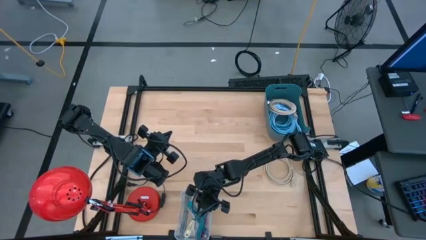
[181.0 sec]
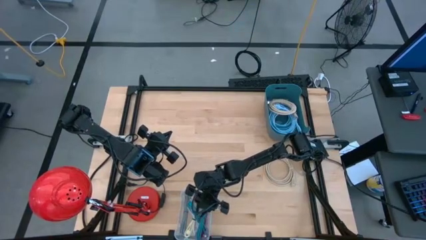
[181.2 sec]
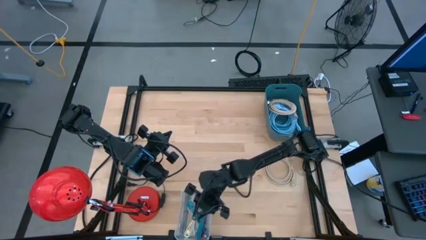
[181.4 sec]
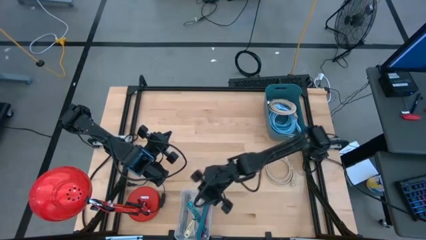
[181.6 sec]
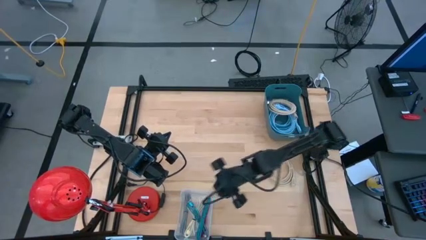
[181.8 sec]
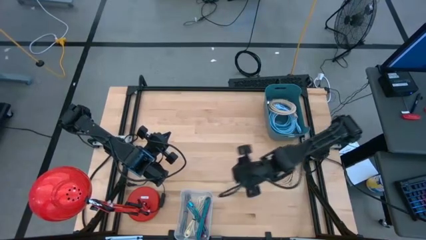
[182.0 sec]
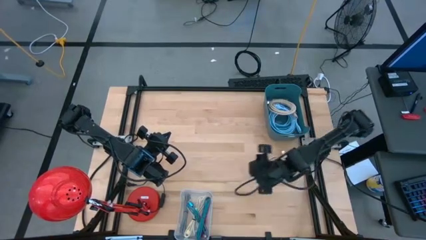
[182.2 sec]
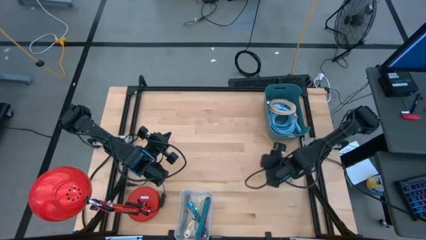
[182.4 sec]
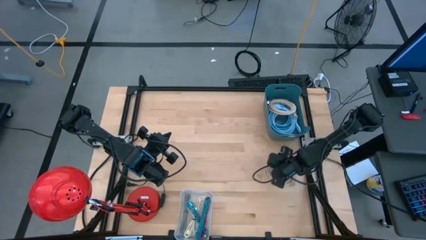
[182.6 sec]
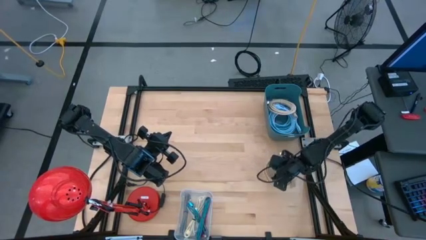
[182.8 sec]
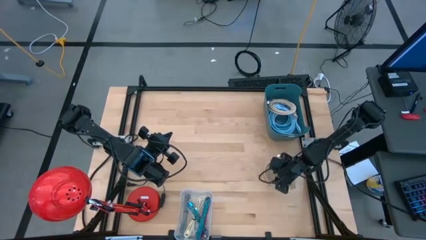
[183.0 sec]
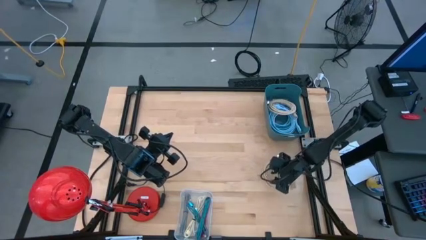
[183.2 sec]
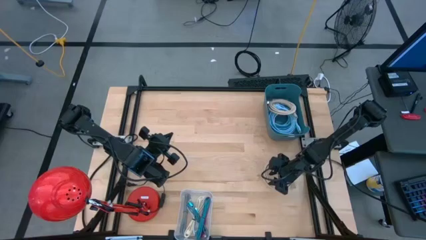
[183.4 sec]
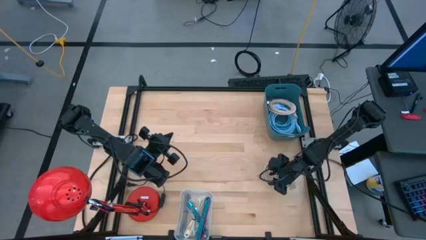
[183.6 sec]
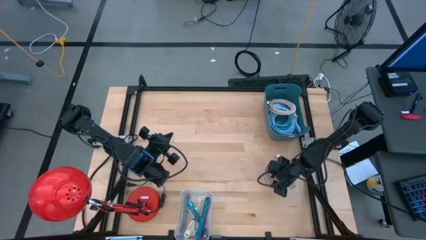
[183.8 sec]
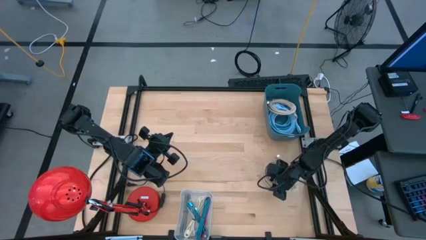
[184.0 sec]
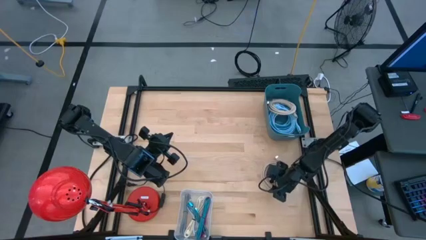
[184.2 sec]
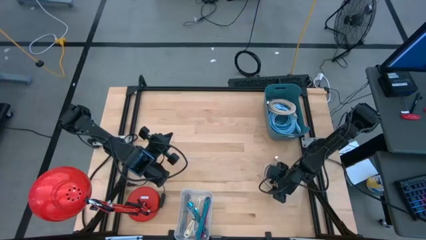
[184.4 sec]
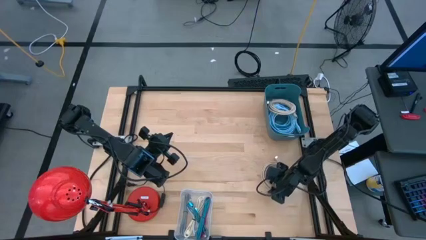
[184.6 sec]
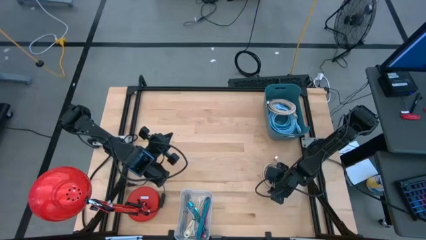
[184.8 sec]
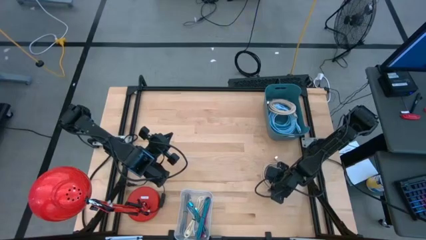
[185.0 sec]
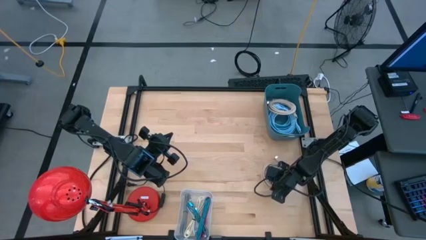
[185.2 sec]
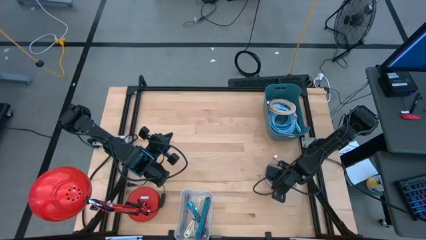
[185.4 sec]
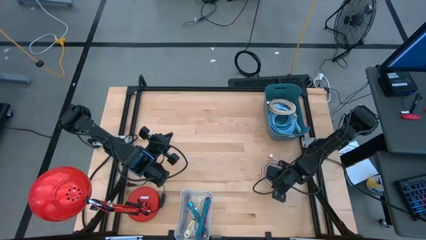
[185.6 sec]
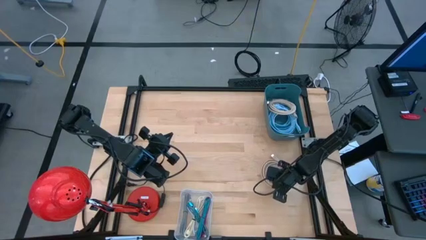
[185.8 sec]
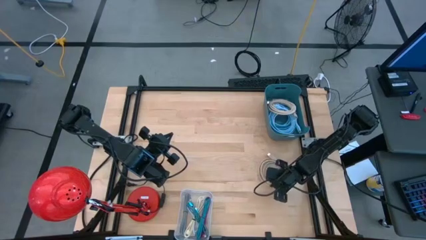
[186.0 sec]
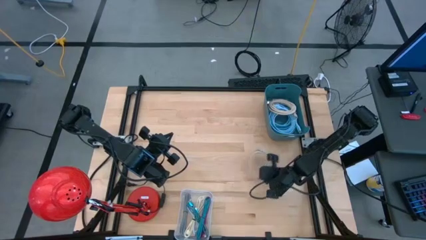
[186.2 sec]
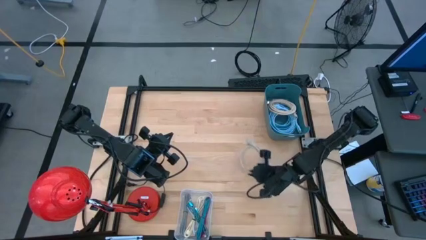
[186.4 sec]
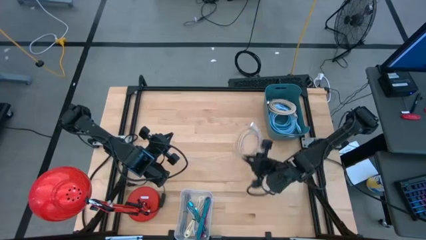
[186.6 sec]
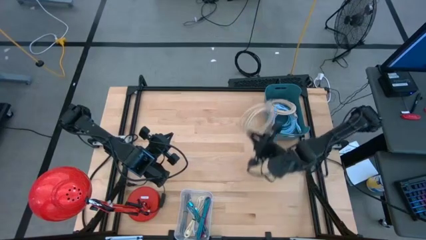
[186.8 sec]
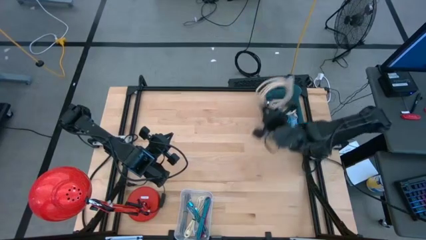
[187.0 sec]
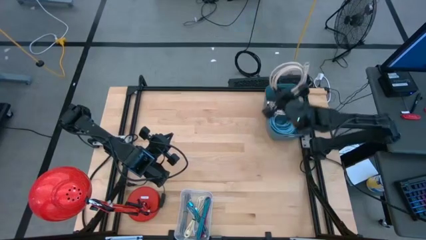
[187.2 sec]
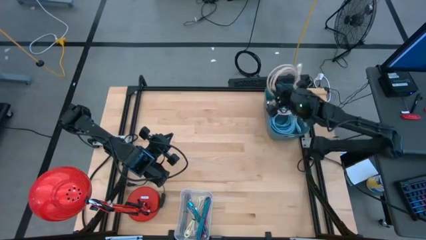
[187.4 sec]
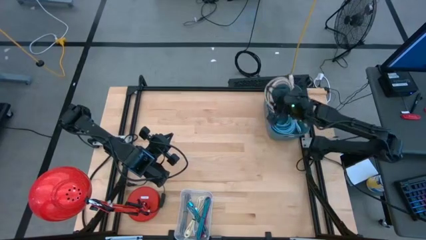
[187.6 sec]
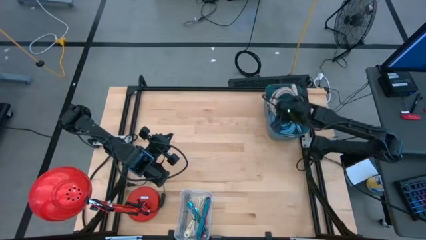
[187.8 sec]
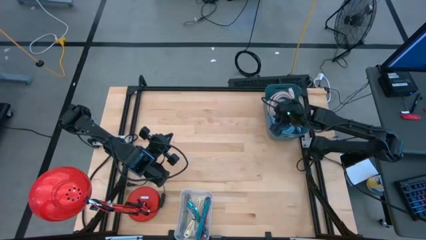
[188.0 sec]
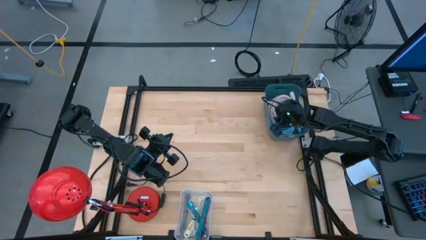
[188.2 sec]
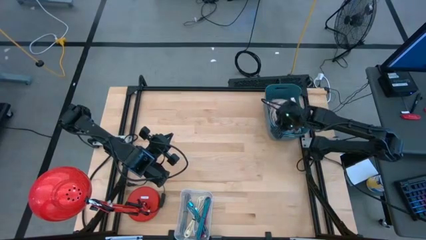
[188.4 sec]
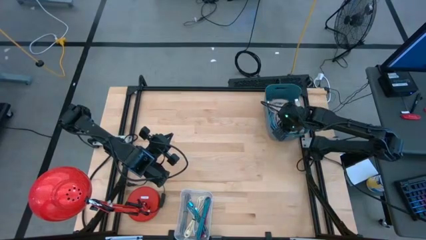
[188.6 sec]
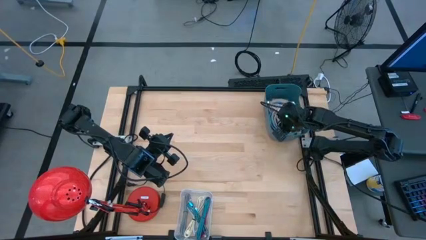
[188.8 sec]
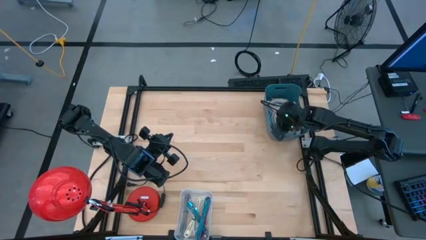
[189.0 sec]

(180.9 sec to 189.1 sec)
Task: Pick & Place USB Port
Put the light brown usb cable into the blue bin

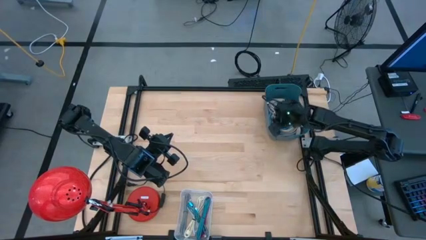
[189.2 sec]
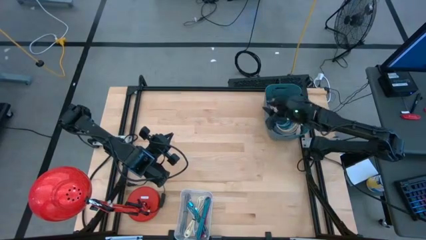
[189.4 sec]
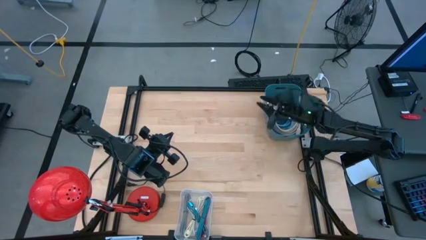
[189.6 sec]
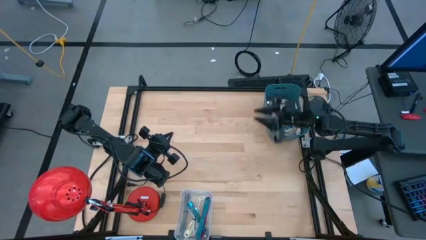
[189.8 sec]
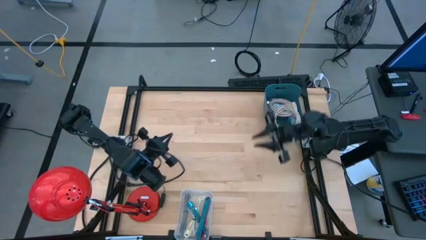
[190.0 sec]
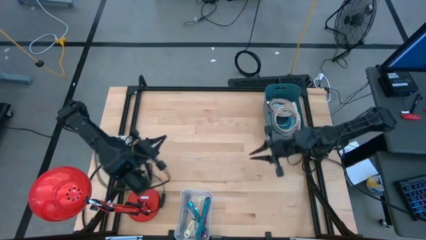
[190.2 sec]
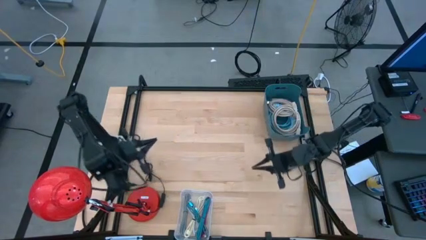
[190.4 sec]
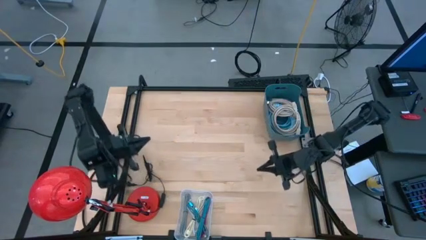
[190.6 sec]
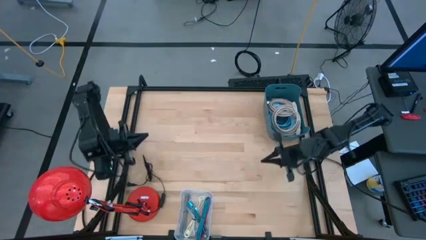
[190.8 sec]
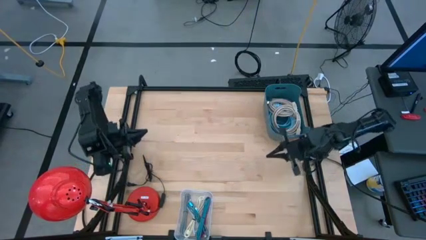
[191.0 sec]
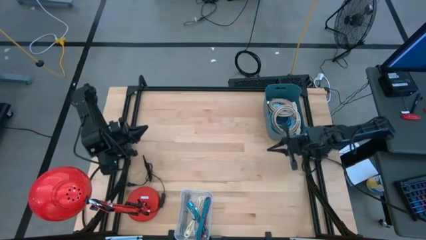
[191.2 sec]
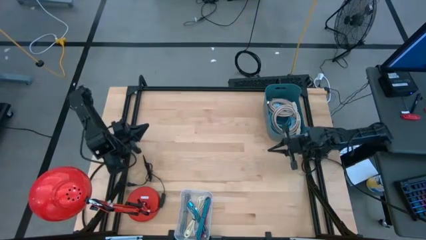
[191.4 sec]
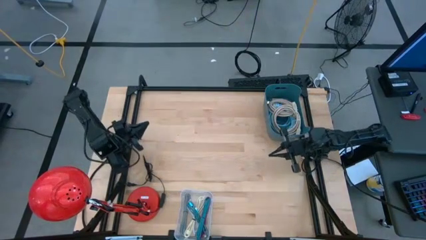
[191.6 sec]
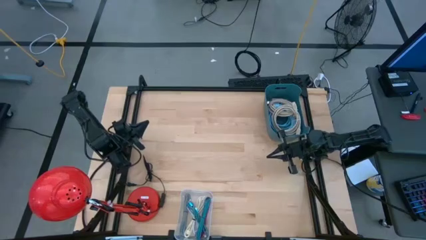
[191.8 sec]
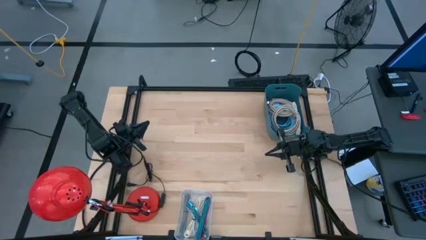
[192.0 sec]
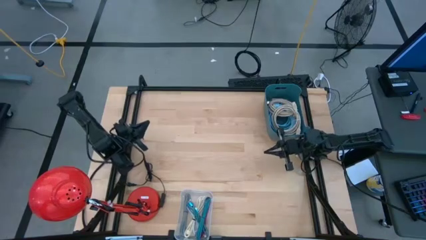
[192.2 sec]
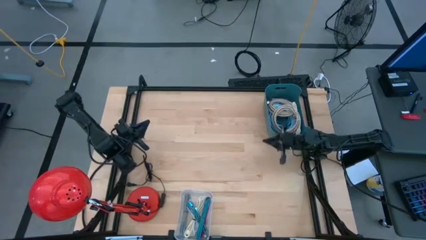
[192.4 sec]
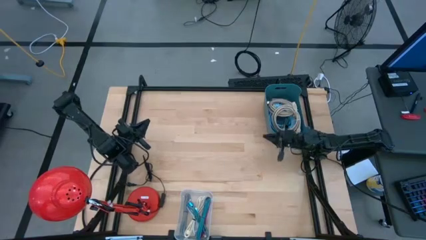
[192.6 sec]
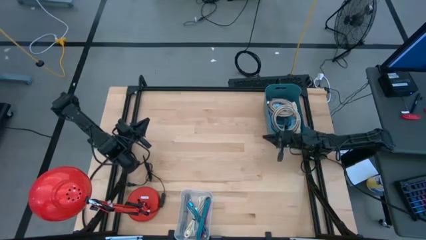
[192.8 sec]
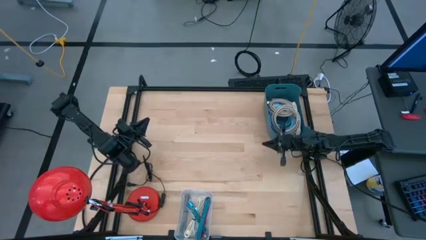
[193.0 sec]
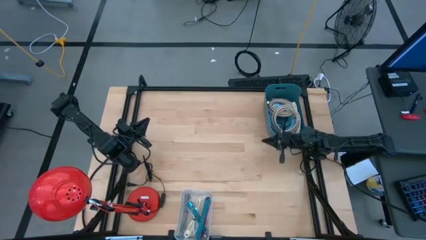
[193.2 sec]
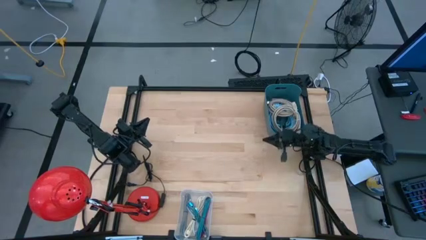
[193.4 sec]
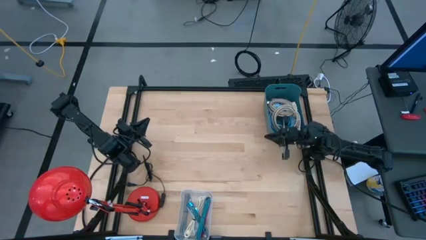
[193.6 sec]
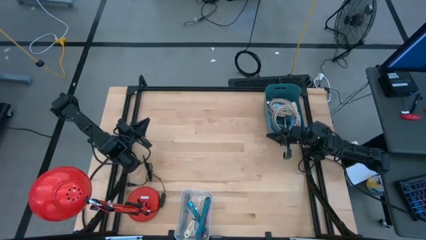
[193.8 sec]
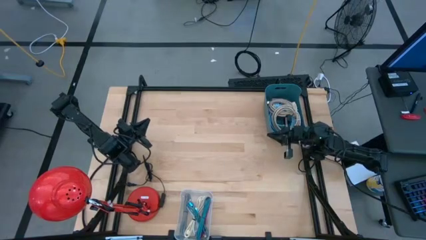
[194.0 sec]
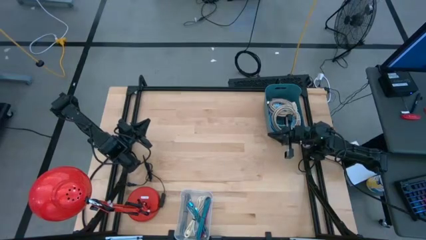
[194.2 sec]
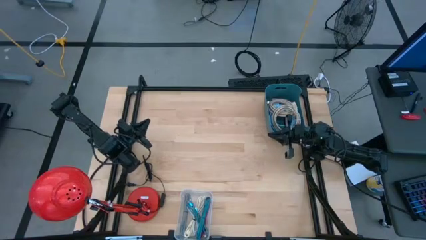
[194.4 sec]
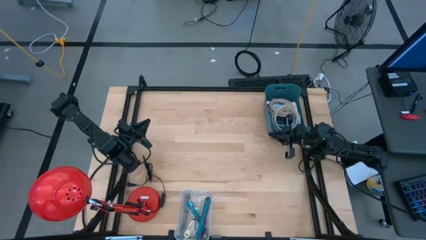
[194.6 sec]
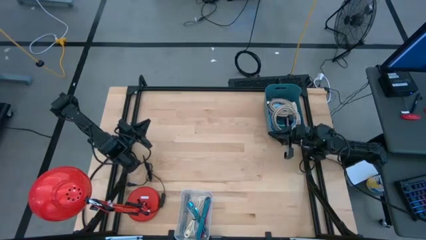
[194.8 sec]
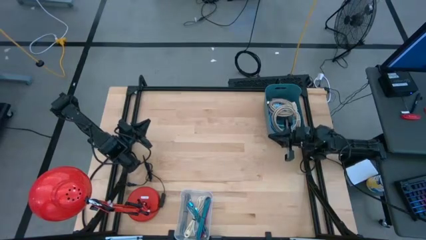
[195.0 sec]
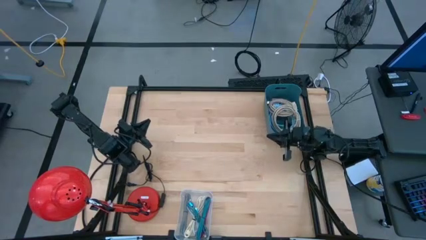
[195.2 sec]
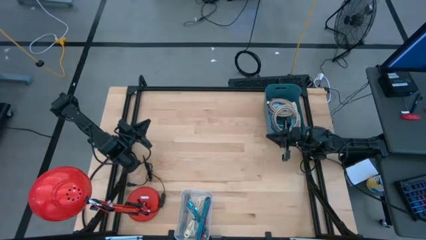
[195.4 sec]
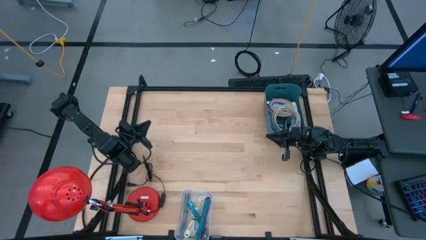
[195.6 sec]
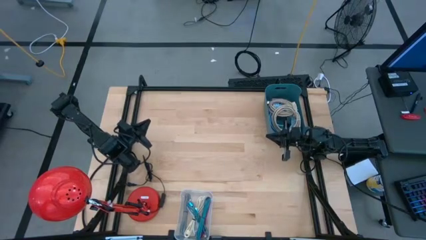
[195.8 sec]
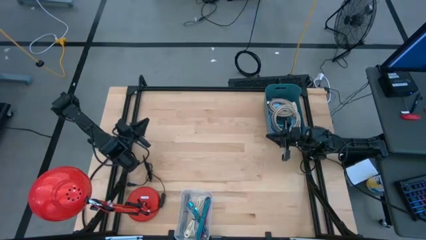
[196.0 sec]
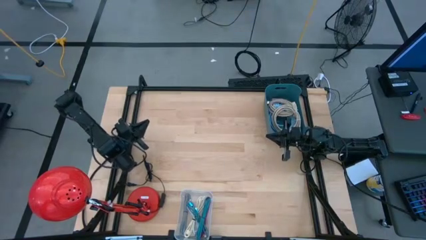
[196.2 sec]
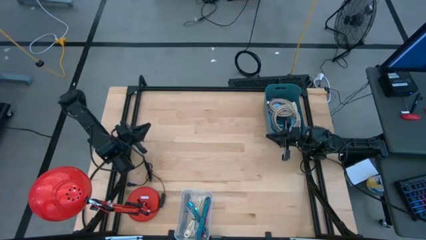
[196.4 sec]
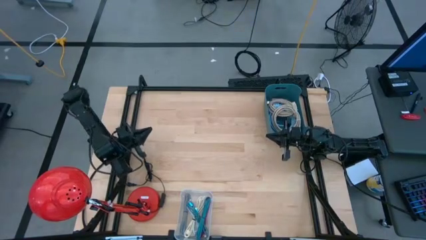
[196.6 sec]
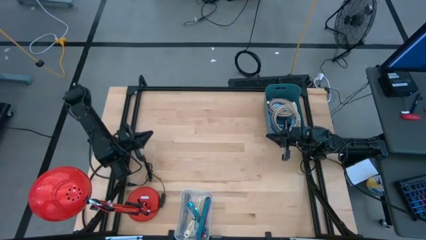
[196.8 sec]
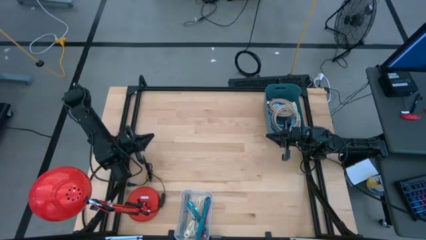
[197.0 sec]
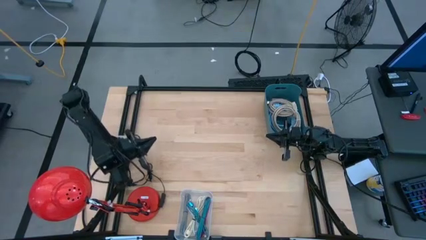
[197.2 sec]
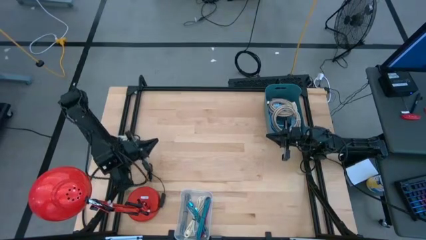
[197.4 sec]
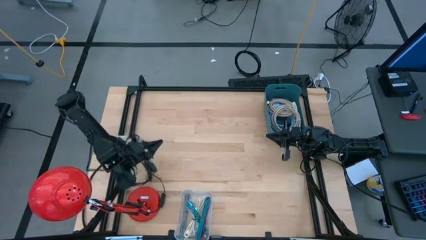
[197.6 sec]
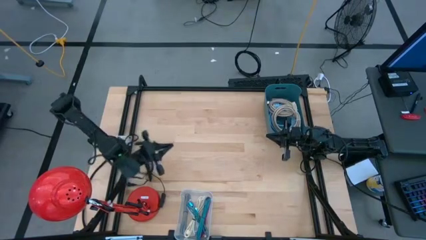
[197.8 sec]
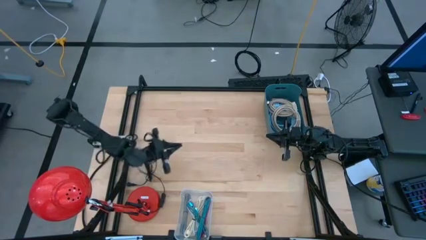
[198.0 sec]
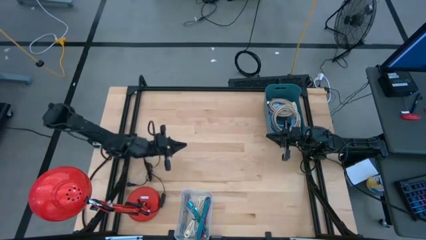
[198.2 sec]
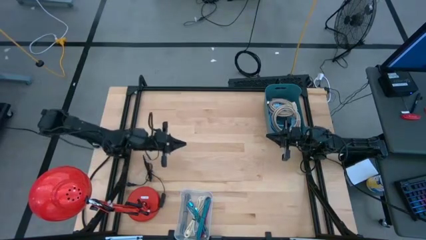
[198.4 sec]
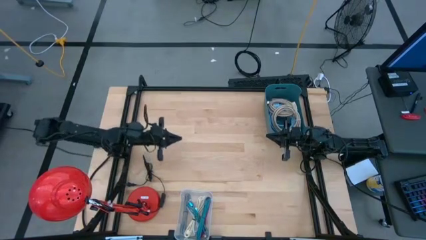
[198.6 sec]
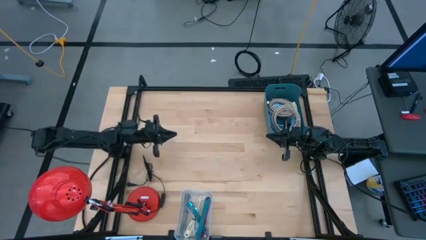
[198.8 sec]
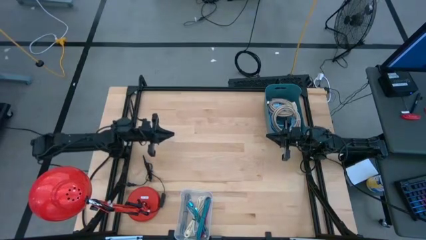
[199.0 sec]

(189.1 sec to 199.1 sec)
Return to Home Position
